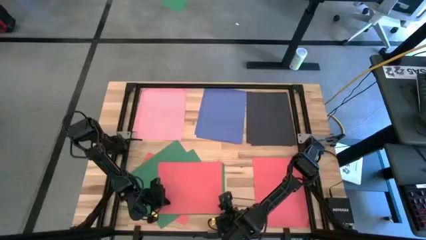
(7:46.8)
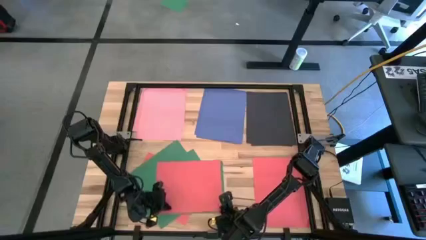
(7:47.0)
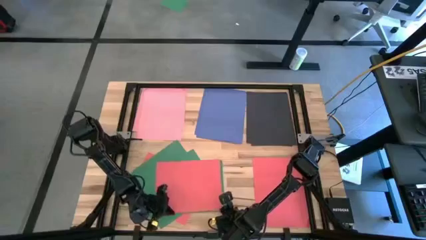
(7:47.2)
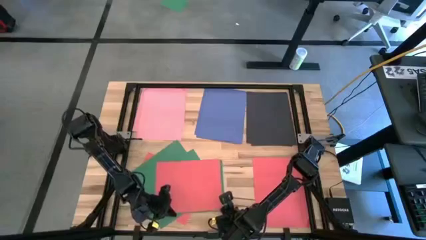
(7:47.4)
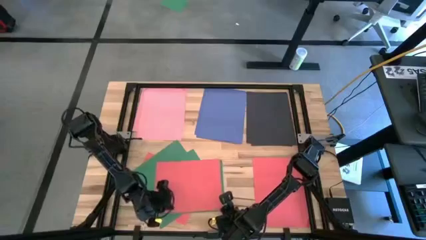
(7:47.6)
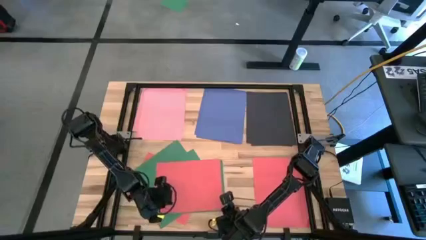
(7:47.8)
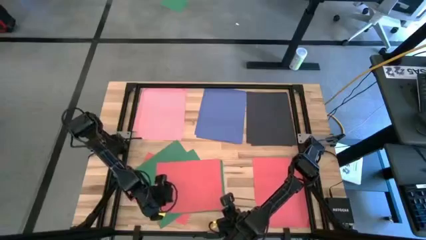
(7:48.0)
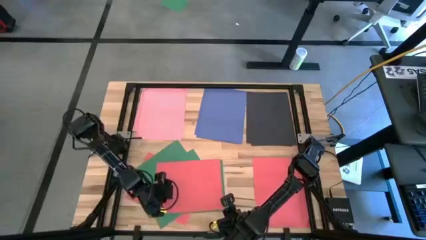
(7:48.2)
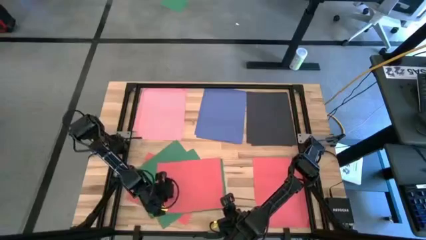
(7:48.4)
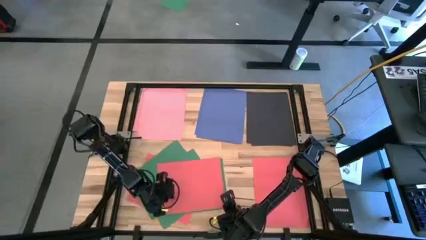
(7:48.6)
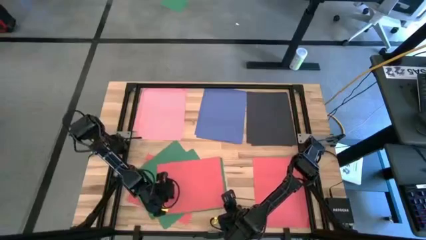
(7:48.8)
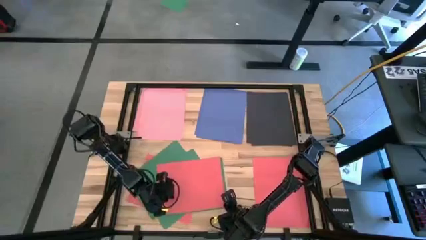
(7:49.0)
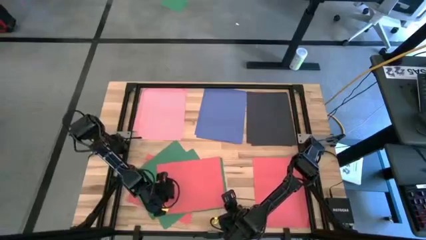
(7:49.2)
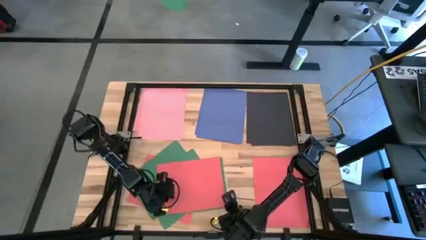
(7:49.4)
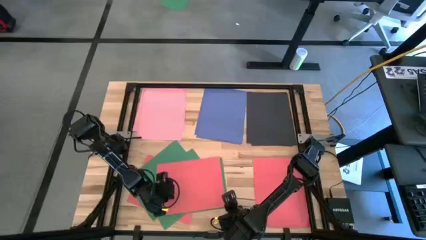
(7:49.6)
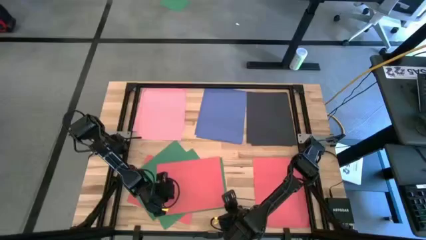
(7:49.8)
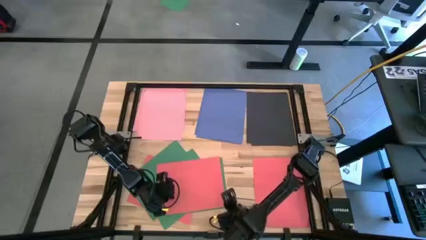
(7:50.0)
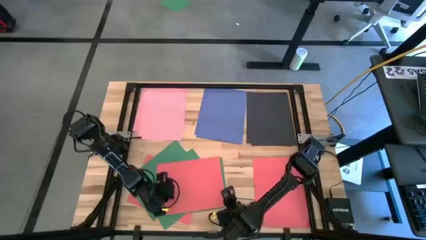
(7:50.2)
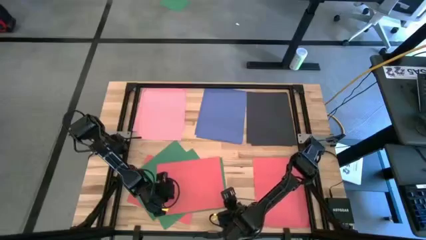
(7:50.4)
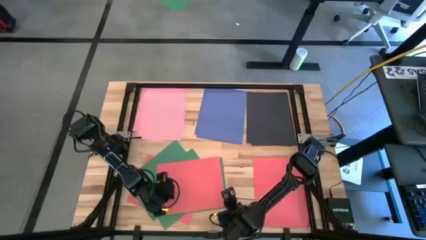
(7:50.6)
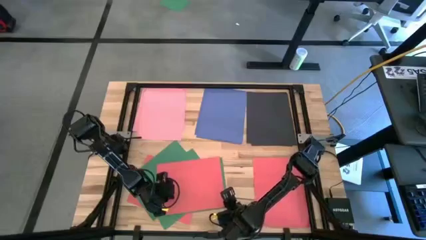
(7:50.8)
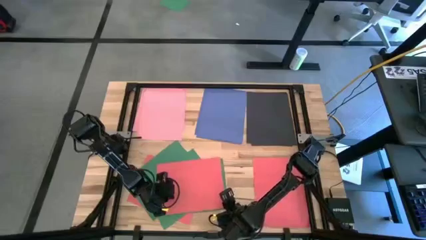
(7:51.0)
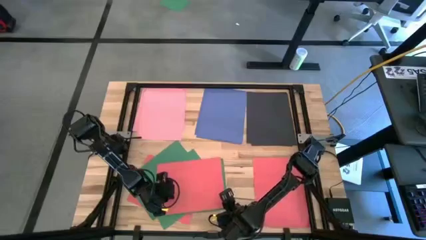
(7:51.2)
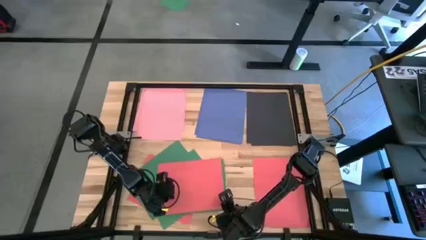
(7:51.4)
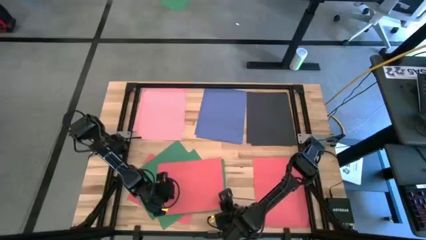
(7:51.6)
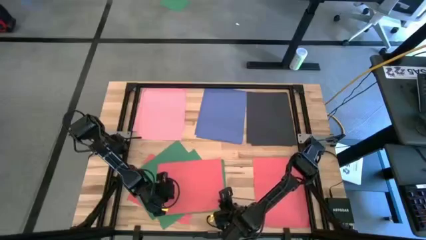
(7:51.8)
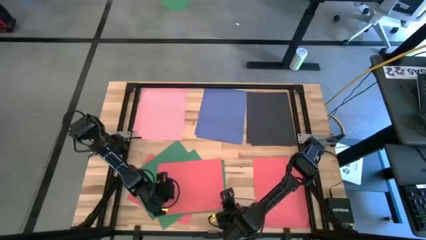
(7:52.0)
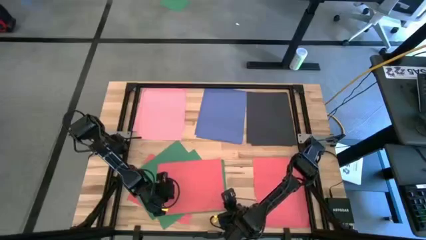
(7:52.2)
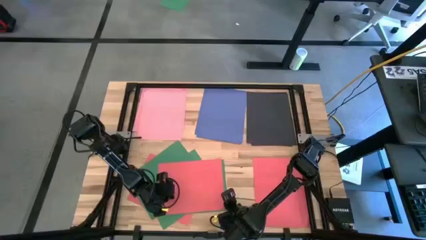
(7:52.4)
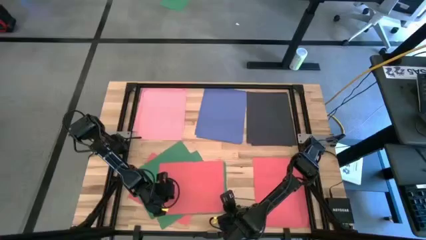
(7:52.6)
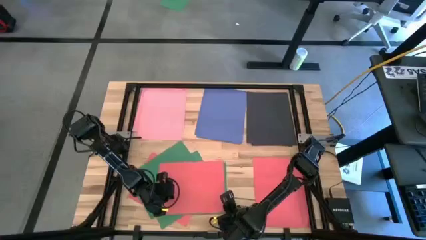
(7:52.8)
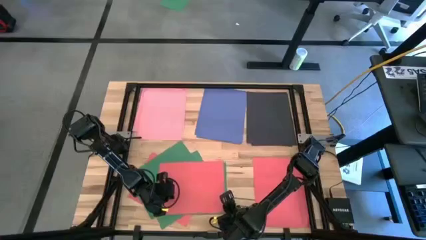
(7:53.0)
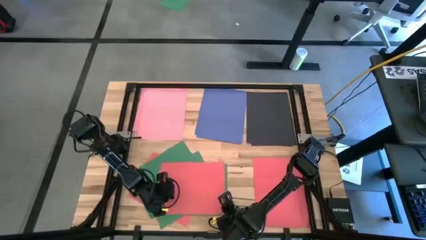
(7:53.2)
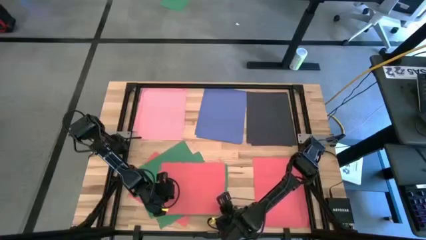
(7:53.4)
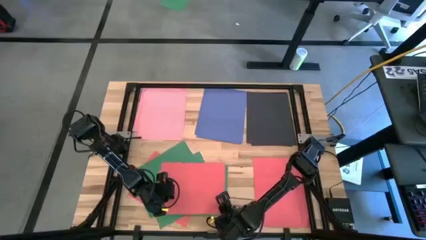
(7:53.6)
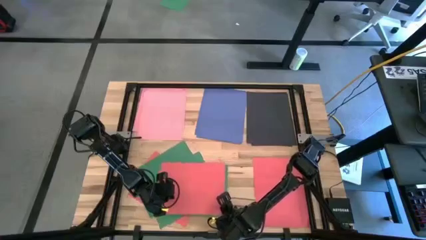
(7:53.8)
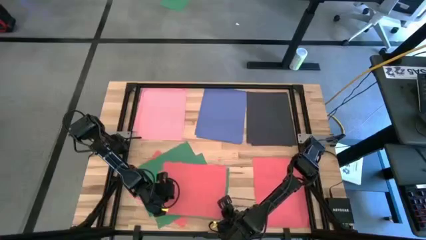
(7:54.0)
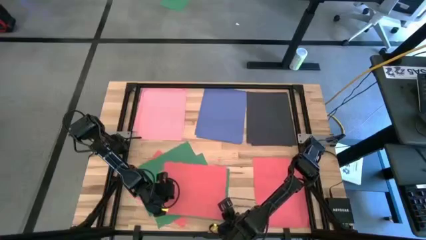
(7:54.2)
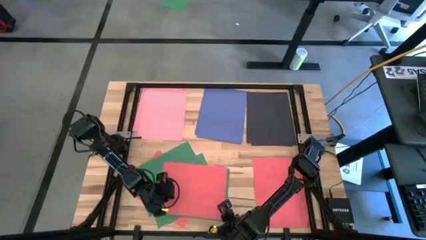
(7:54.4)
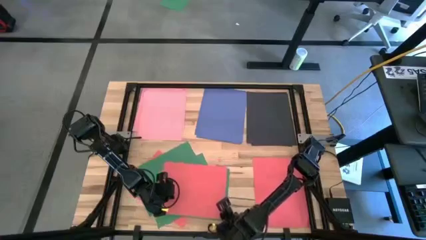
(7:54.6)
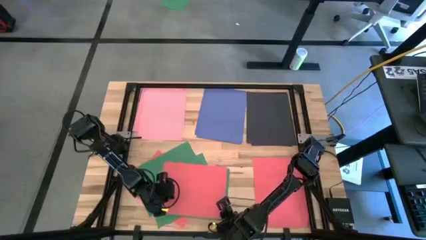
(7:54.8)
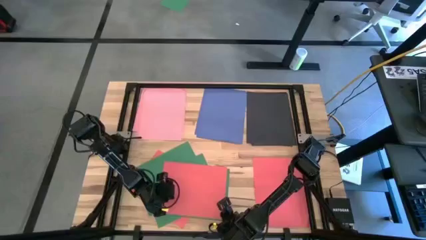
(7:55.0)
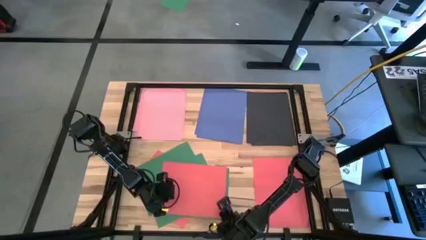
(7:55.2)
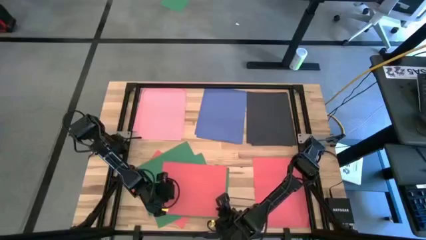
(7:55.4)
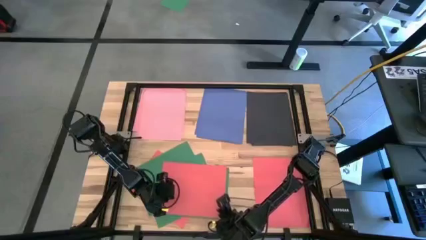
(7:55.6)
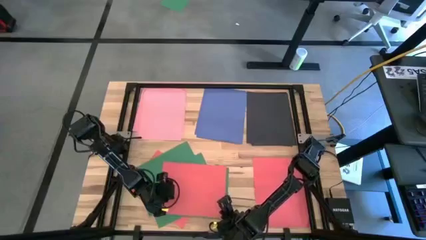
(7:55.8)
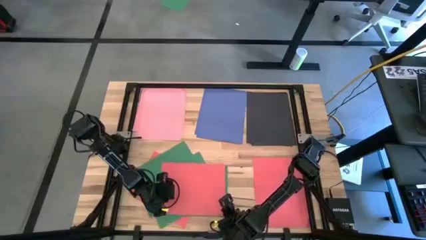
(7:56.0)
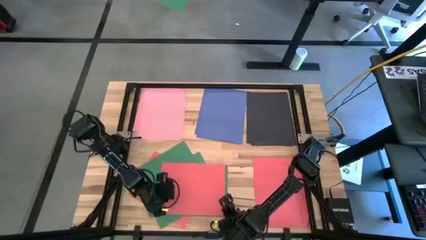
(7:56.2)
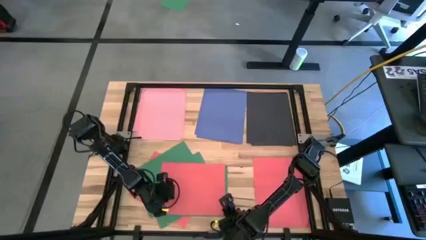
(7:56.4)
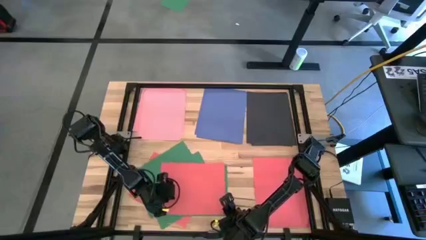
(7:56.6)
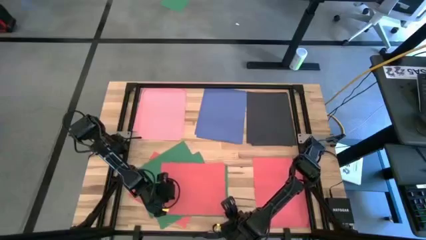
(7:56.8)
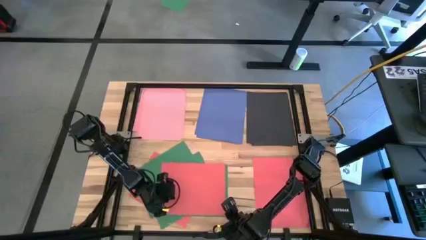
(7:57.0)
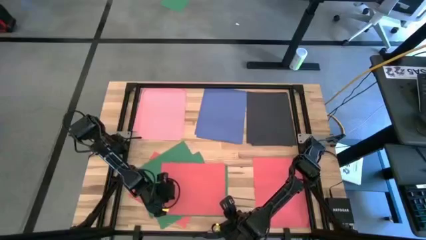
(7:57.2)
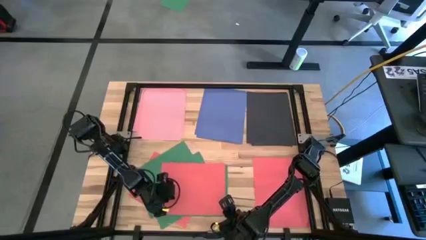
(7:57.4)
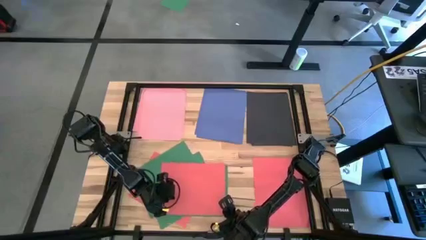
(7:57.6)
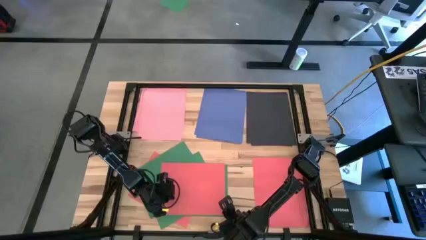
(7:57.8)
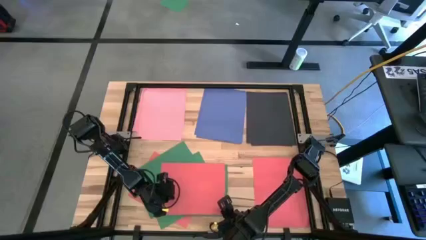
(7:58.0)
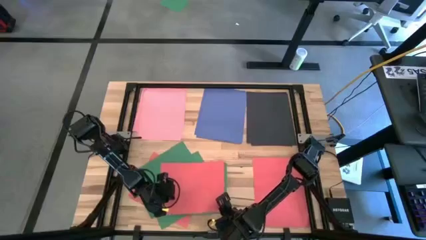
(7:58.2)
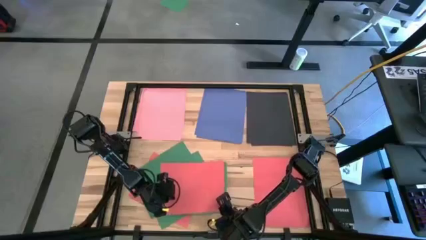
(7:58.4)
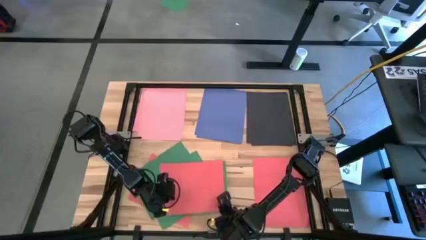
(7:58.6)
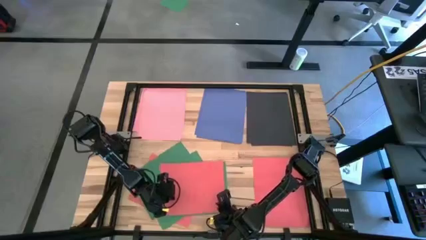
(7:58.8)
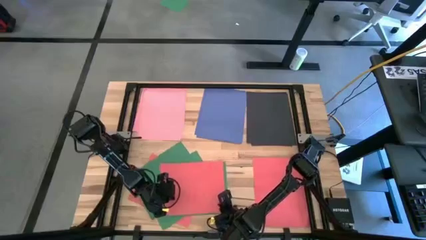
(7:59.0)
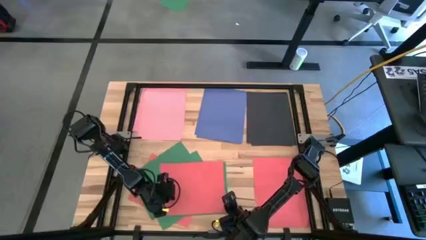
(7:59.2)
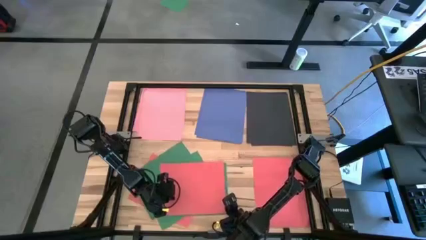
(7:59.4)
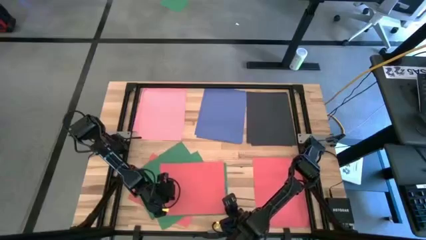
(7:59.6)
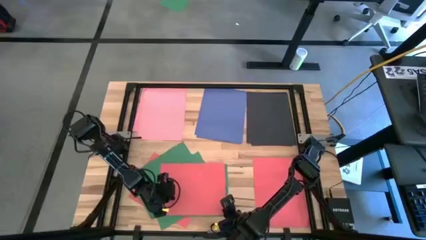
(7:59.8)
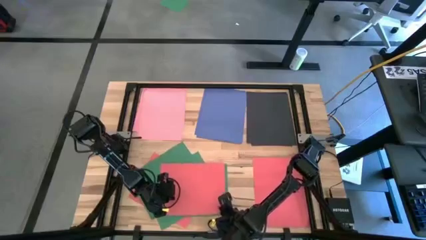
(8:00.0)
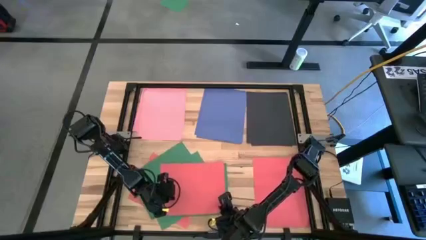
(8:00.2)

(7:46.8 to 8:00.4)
Task: Organize paper
Stack the red paper on top of the other red paper on the table
